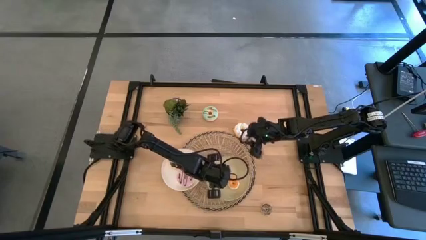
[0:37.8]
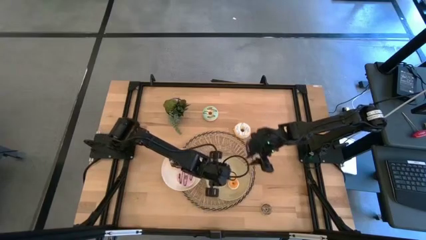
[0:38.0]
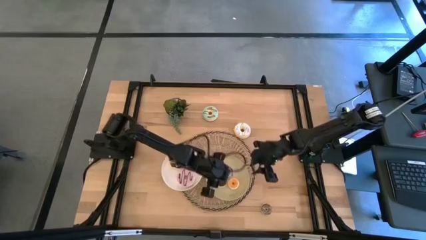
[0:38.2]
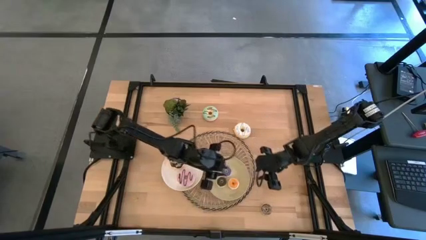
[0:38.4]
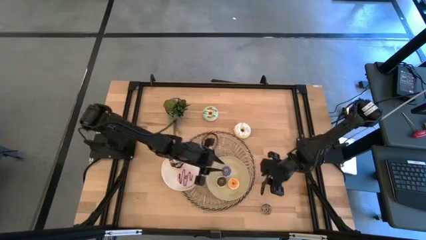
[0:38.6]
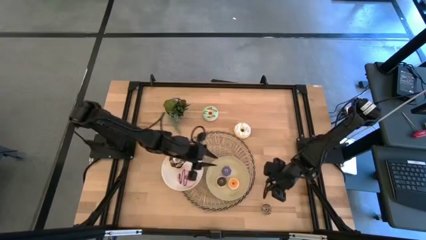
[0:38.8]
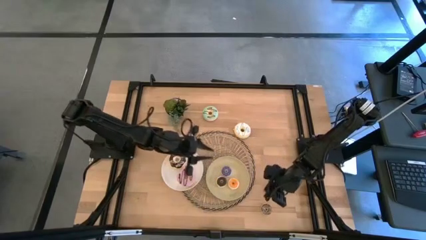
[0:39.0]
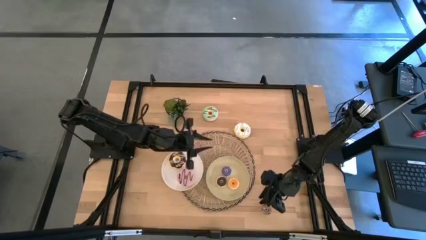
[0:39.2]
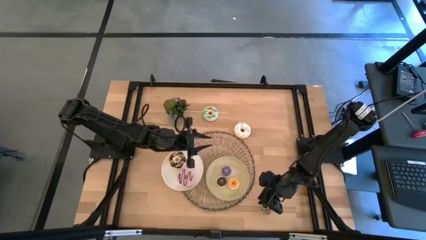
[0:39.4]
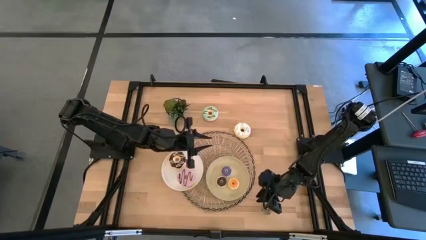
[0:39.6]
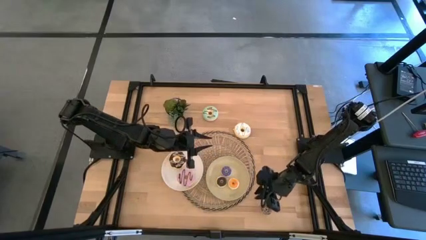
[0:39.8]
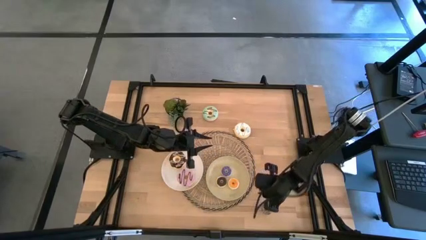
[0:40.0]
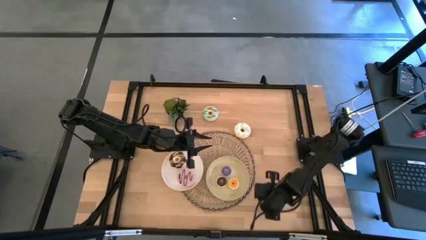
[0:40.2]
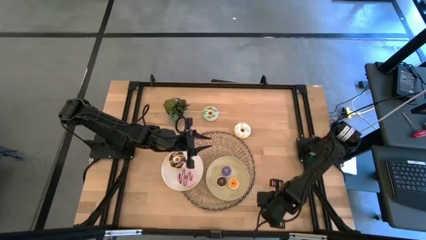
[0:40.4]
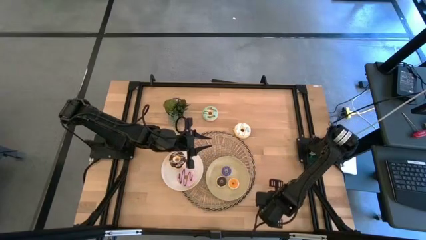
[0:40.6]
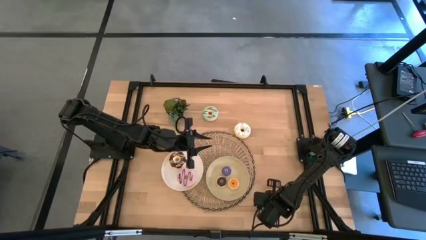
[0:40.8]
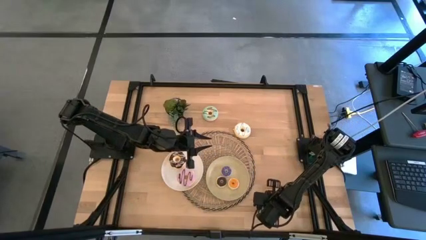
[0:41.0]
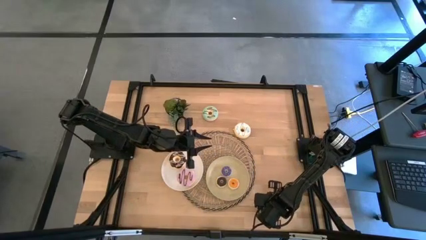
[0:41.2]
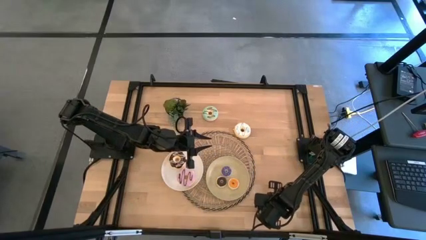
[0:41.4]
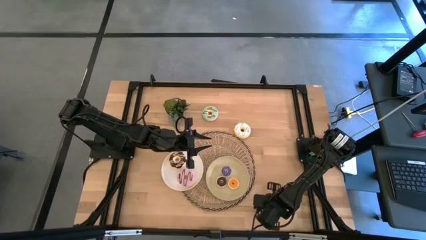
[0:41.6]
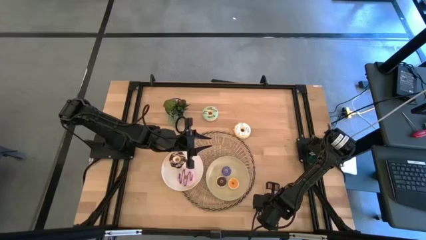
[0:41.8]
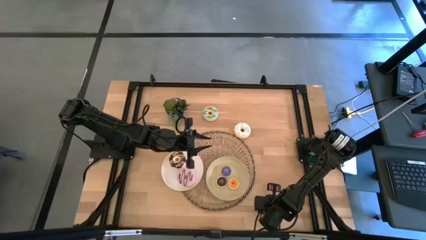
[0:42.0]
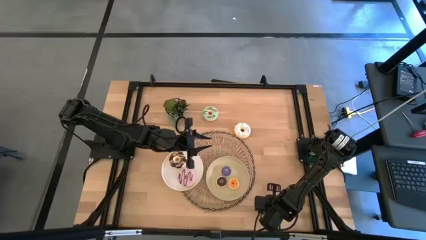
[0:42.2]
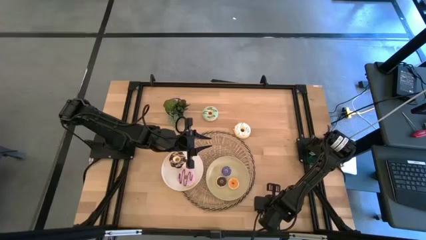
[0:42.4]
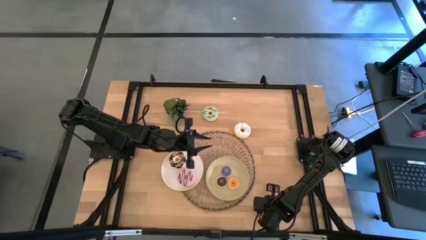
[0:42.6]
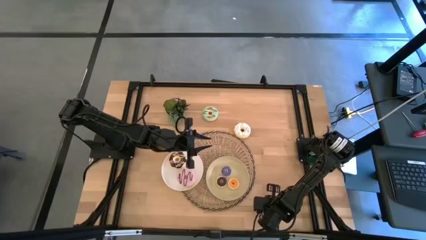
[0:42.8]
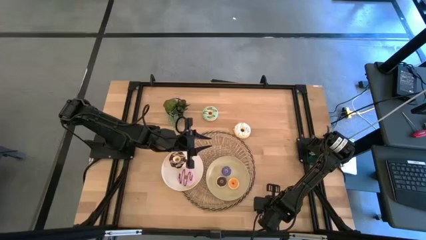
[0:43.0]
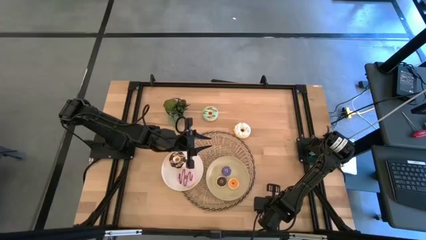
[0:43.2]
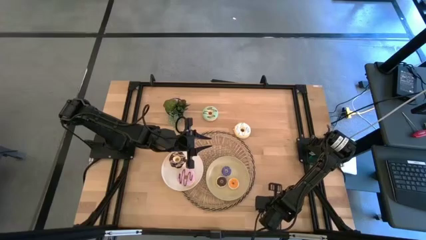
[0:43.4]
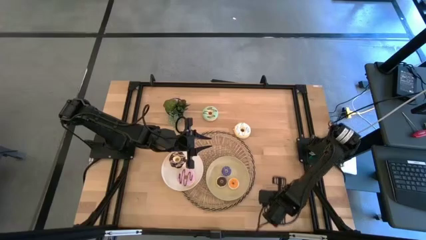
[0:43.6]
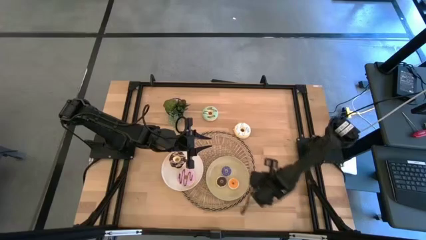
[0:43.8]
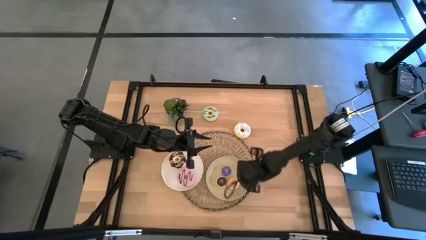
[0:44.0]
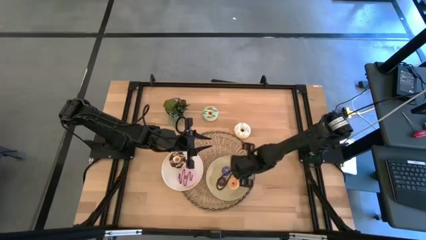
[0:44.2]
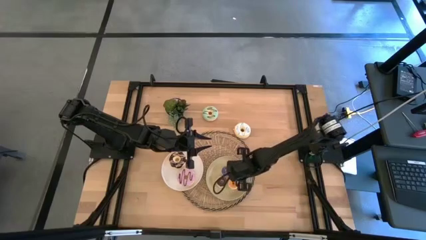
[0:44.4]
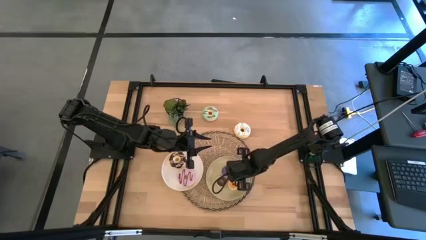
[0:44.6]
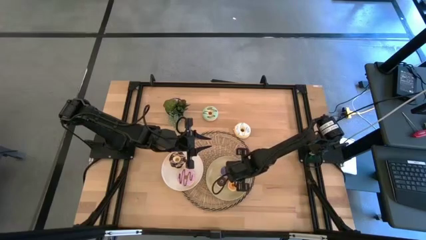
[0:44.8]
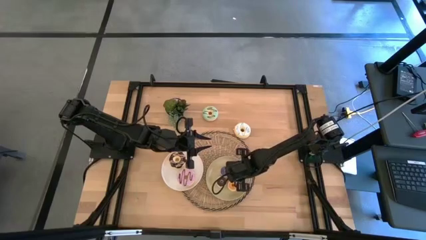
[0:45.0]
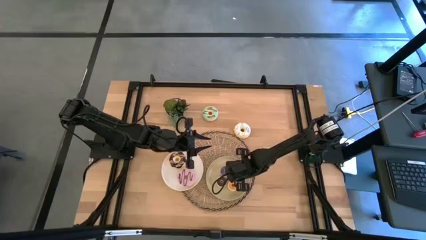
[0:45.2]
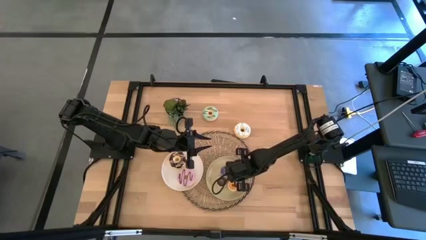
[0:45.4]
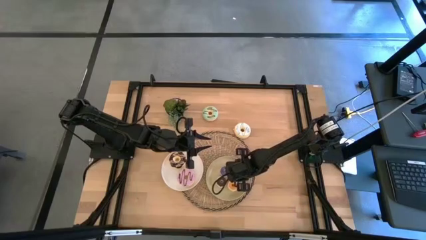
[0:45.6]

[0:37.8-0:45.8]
Task: Pick & Place donuts
Put the small brown donut on the brown plate

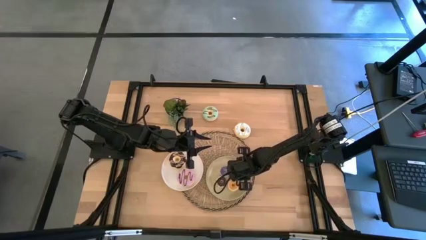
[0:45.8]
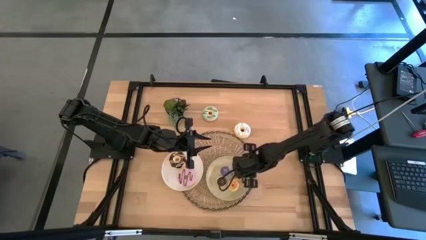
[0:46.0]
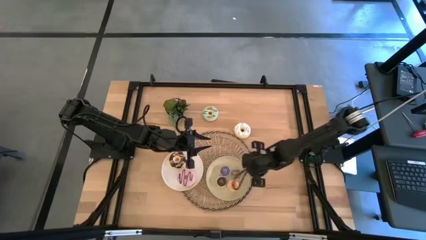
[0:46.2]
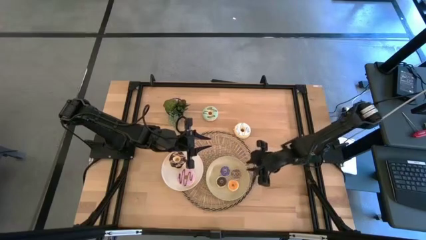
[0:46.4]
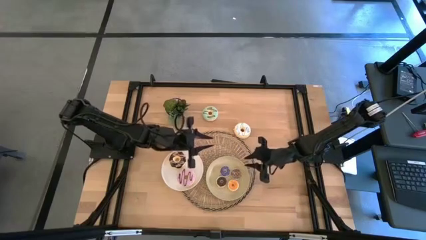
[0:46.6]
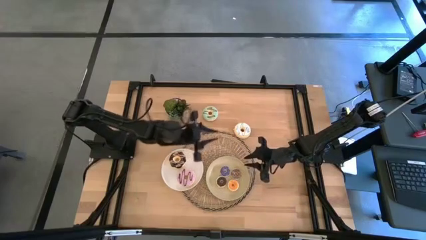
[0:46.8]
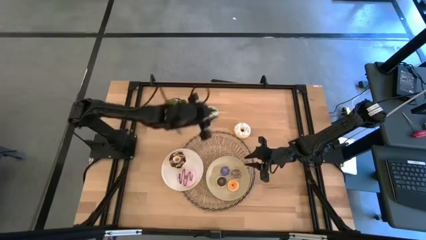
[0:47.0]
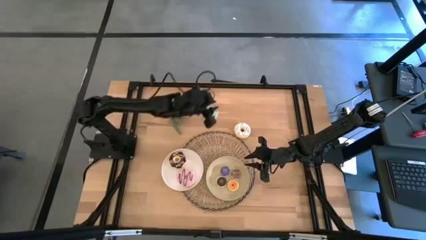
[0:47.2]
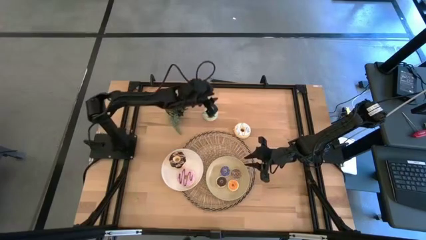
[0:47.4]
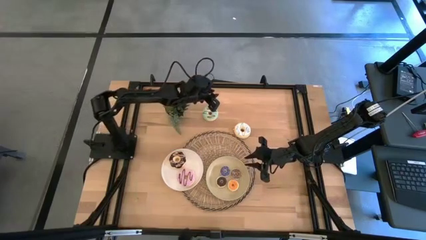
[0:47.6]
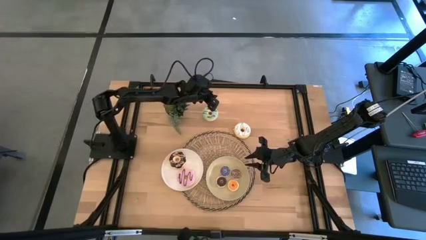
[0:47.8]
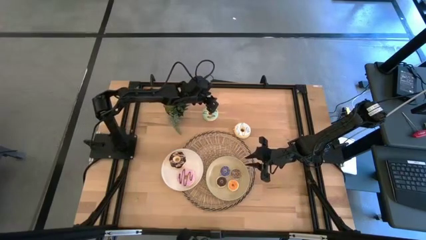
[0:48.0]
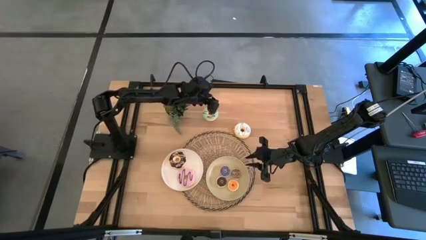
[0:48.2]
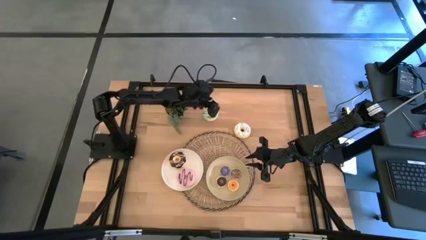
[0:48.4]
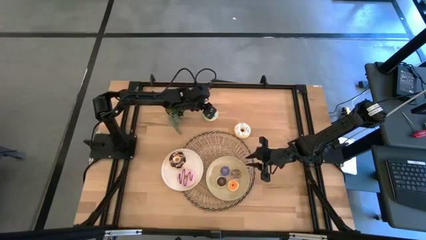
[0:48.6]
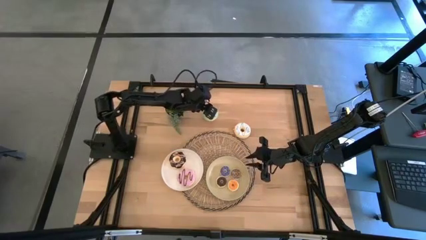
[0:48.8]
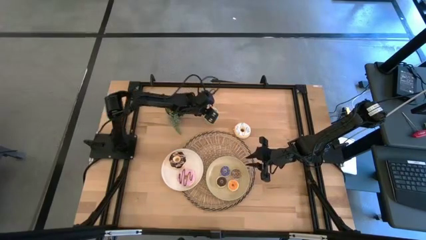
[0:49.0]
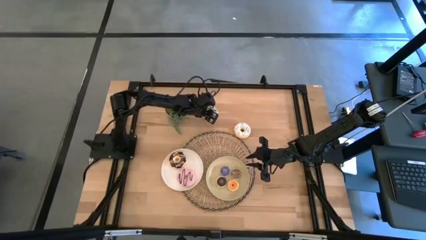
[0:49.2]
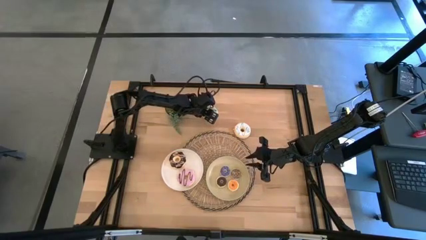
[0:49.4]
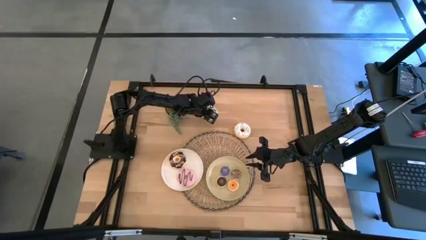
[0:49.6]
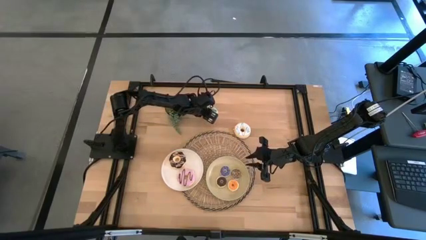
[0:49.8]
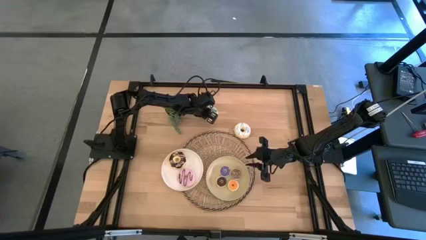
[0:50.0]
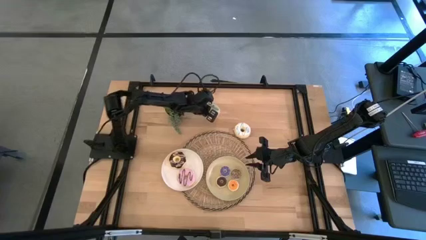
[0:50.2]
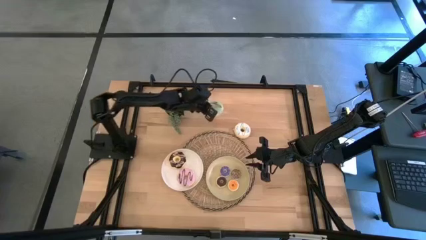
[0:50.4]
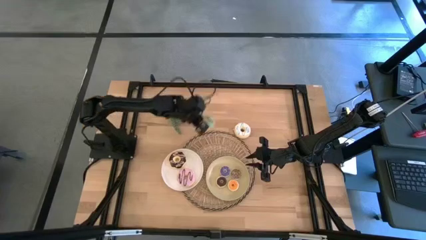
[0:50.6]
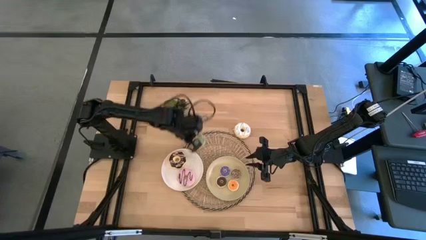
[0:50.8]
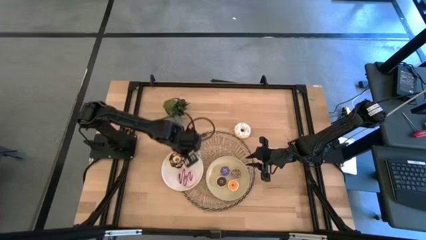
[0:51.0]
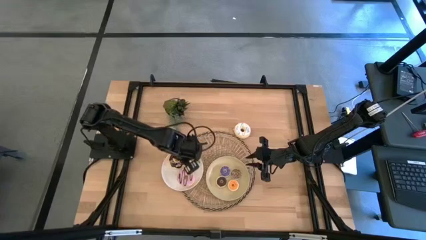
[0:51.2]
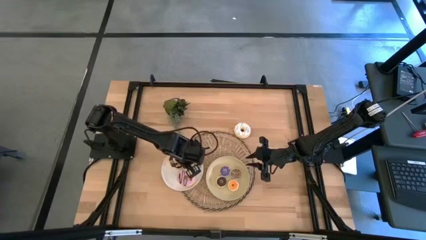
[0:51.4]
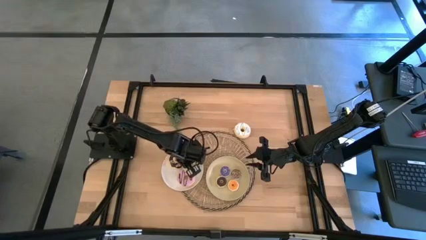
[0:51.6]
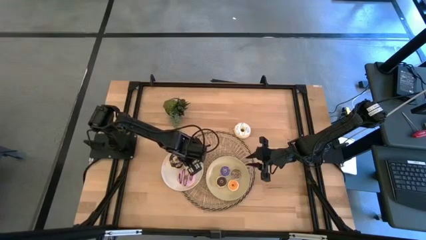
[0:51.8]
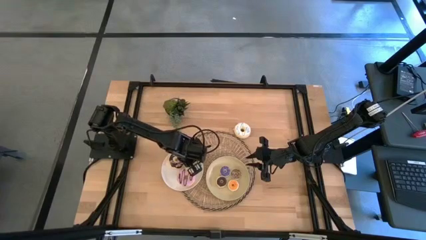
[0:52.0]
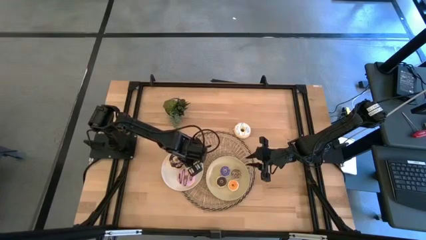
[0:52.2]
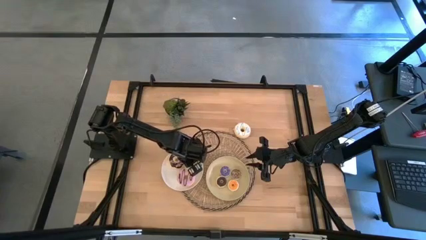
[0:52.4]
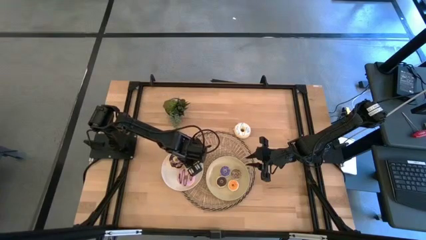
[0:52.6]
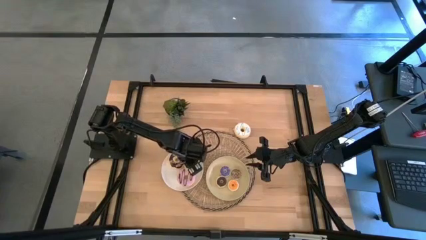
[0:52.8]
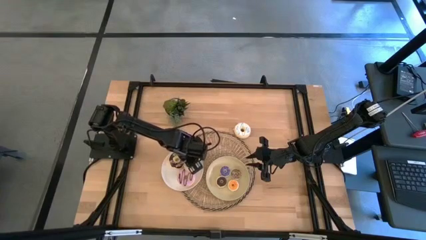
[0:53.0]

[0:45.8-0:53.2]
Put the large green donut on the white plate
